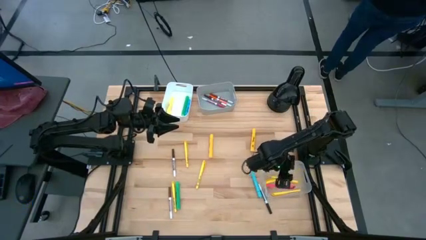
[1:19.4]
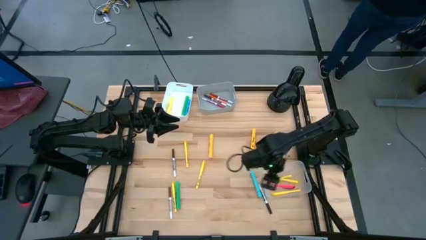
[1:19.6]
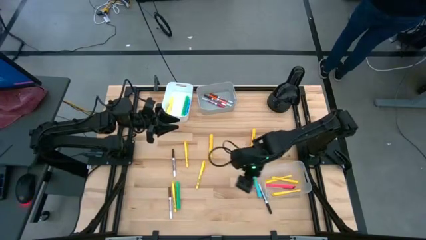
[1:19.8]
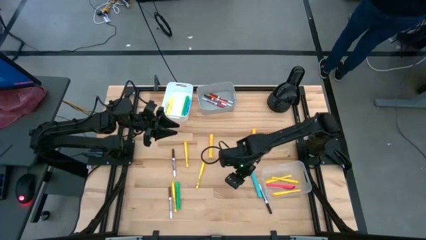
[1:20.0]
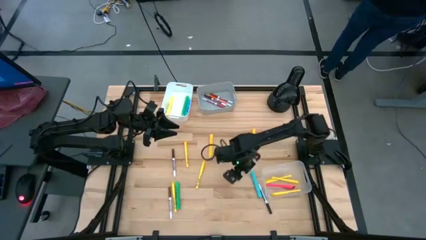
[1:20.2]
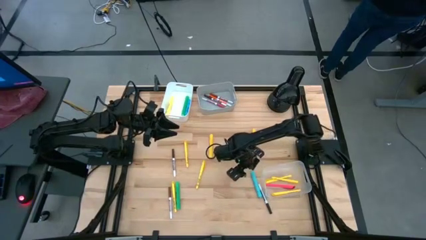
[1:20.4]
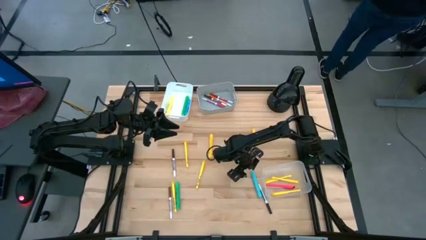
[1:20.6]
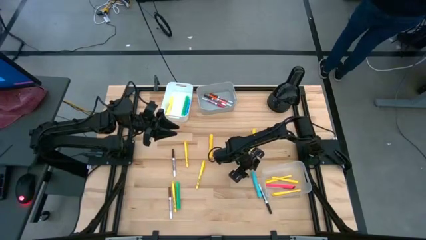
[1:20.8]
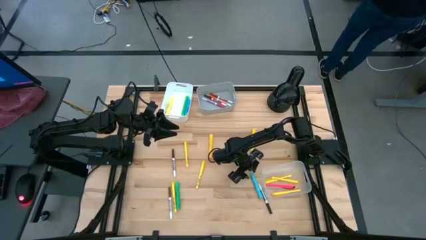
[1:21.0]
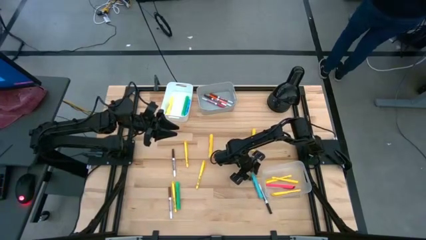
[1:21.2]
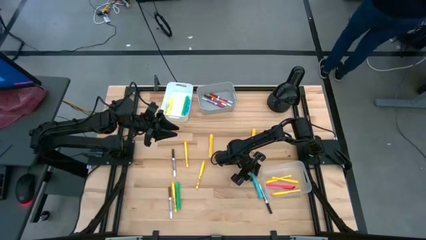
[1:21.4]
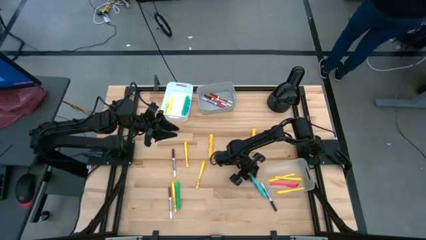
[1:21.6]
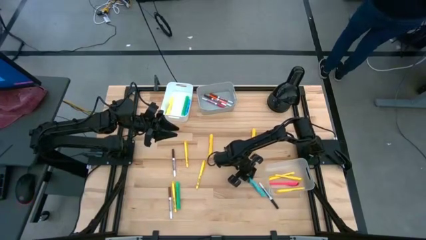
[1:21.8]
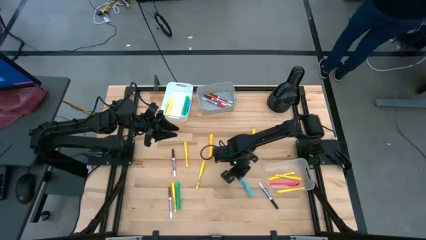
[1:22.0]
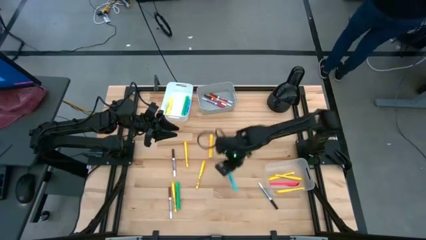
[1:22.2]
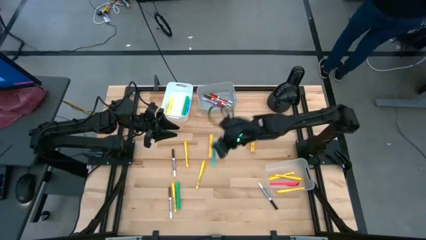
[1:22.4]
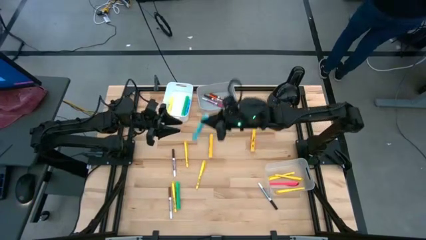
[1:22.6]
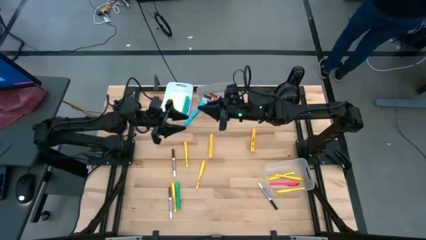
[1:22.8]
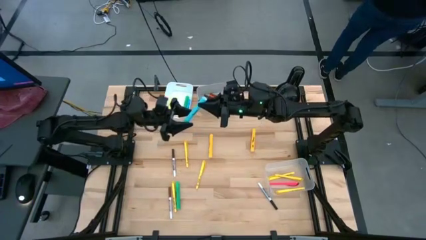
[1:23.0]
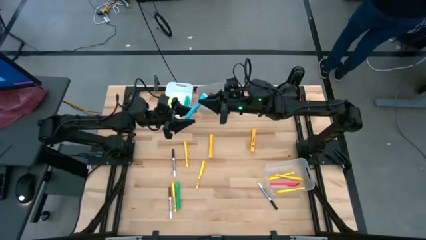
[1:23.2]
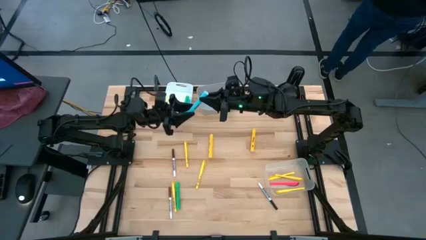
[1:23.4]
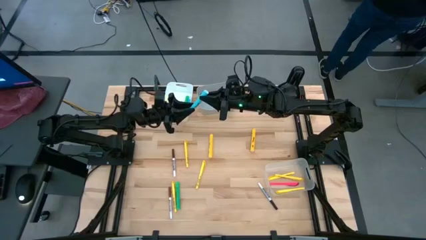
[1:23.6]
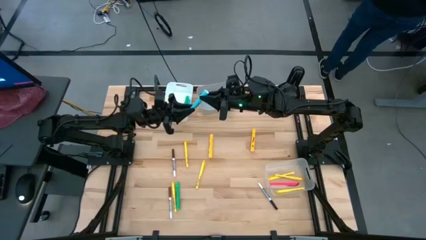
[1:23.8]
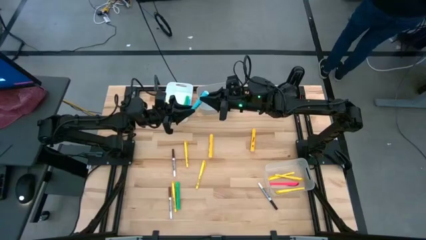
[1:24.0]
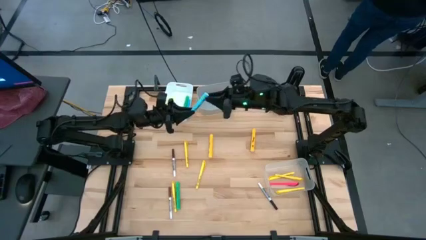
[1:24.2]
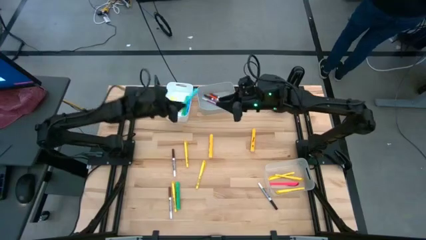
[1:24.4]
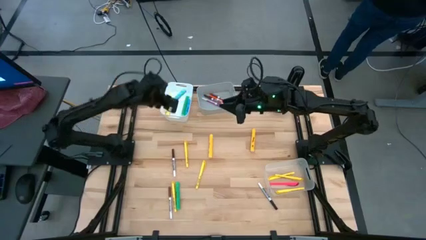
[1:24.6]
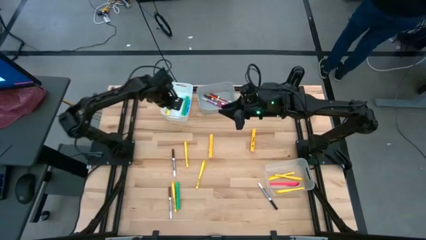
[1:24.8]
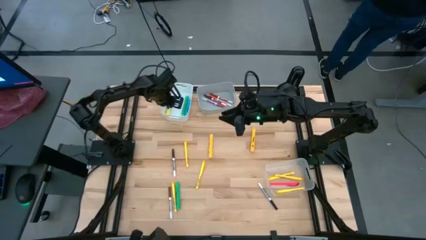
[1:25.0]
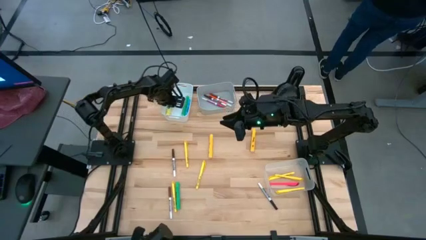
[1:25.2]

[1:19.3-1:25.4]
Task: Pick & Place Markers
Put the light blue highlighter pen into the white bin

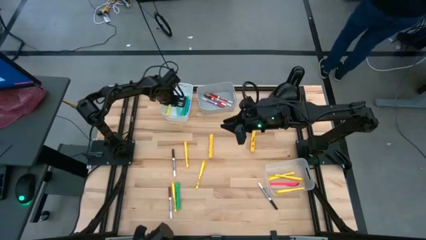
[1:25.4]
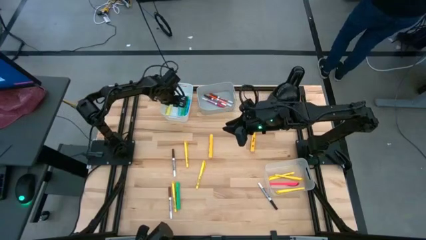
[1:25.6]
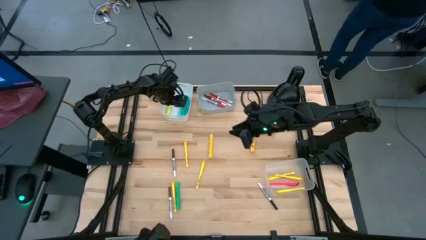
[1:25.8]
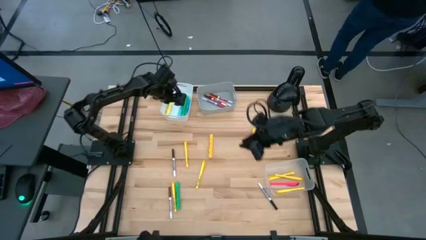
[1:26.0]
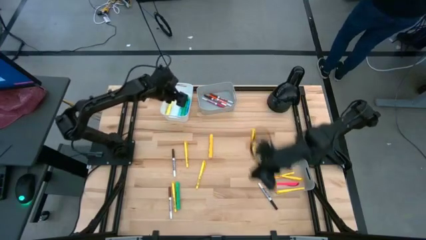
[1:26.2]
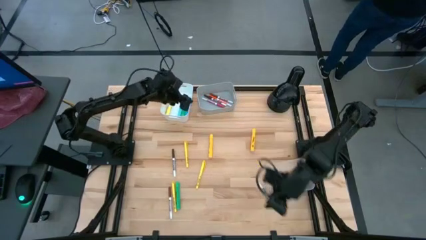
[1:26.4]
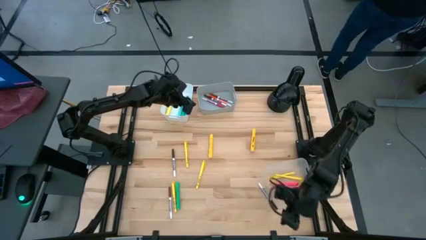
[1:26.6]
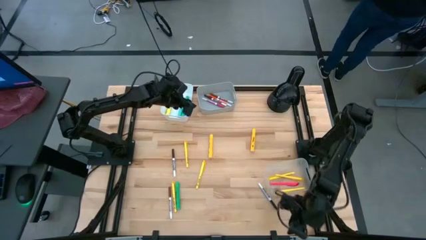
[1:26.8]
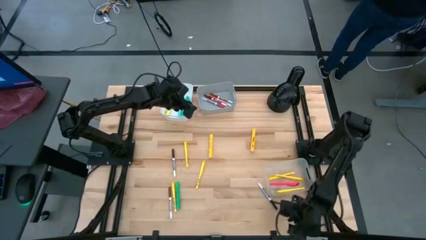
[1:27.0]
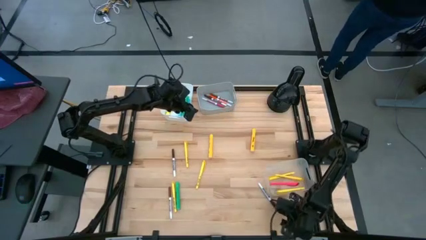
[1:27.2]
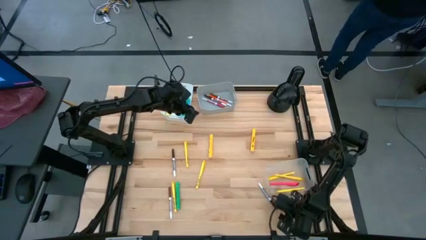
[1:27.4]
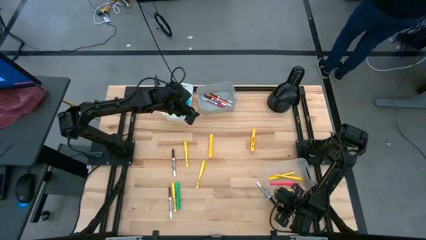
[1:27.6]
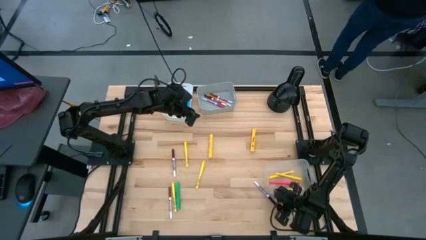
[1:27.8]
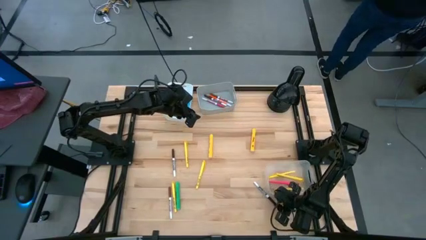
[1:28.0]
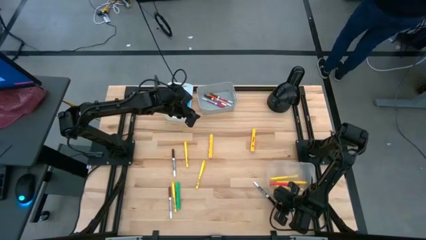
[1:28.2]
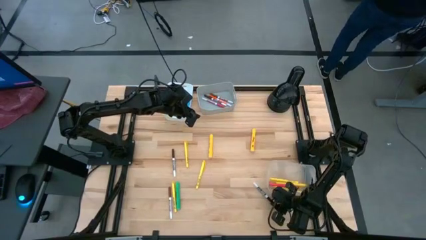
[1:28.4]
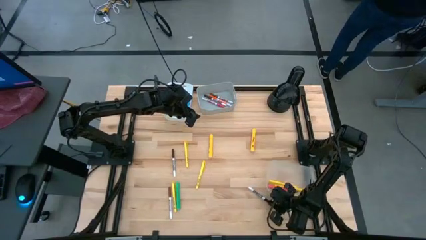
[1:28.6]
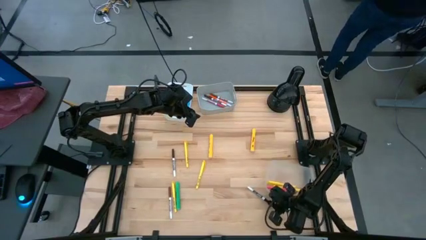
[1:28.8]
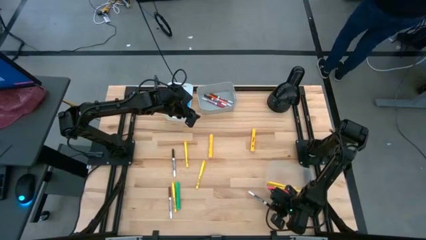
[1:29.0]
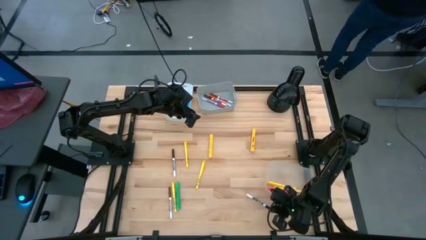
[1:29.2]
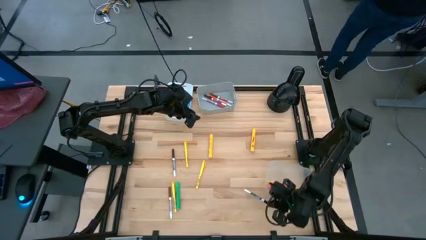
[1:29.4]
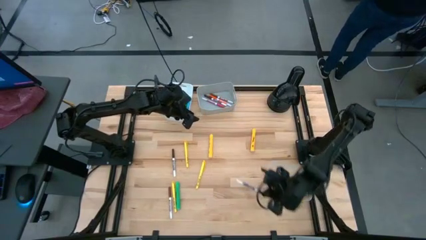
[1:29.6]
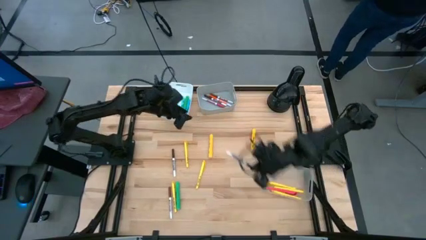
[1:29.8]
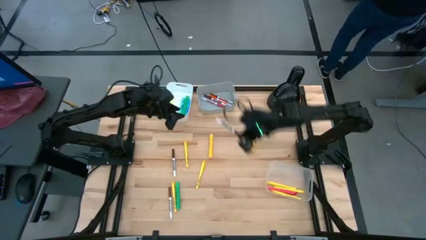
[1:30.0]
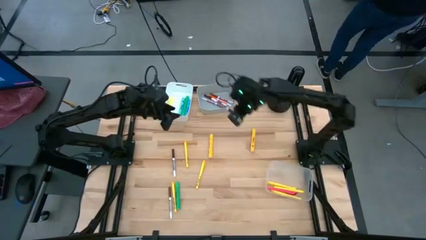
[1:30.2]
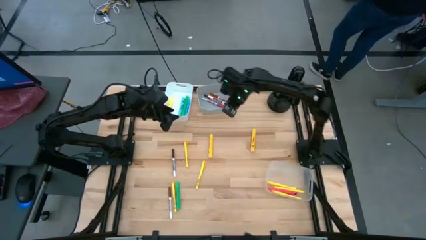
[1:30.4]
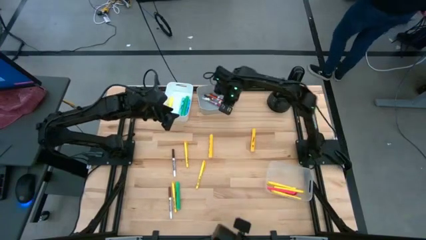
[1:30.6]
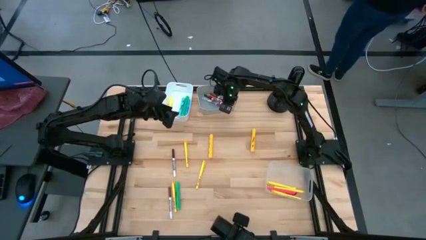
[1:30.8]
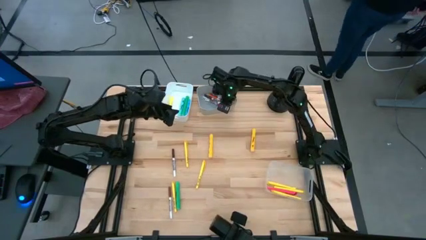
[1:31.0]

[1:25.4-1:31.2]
Put the black marker pen into the gray bin

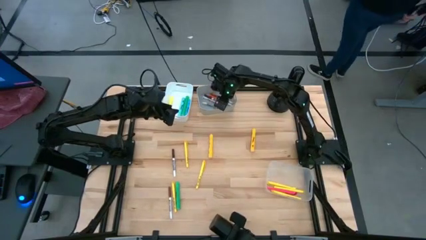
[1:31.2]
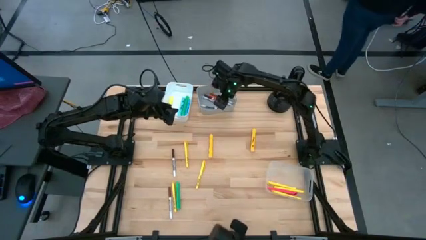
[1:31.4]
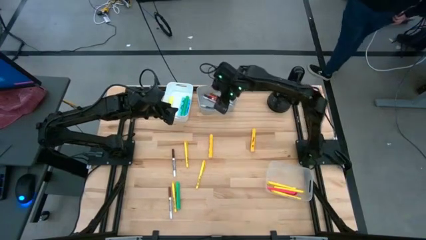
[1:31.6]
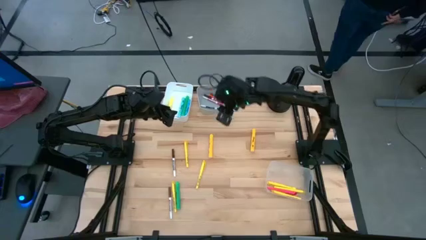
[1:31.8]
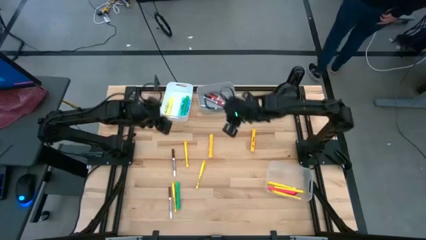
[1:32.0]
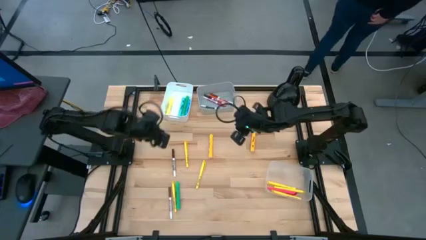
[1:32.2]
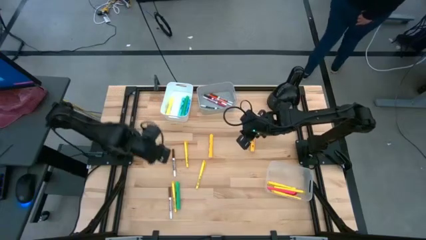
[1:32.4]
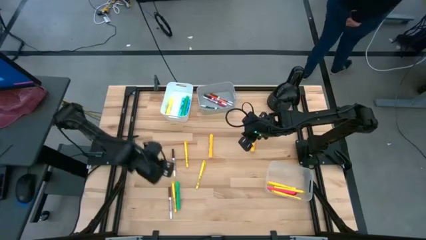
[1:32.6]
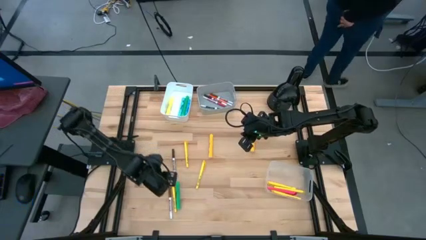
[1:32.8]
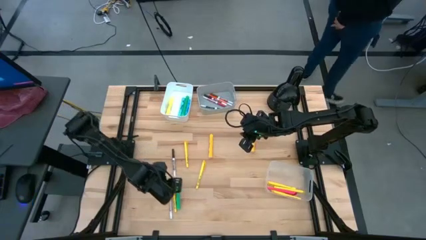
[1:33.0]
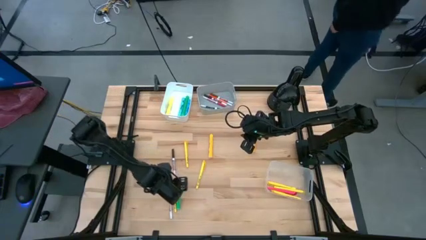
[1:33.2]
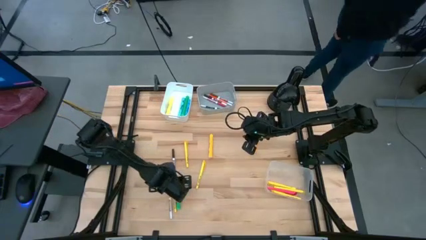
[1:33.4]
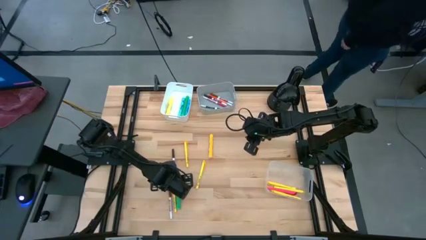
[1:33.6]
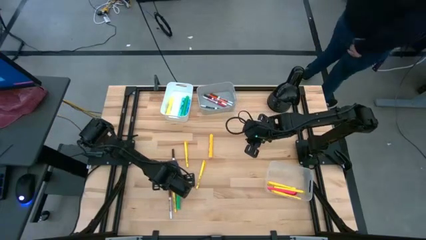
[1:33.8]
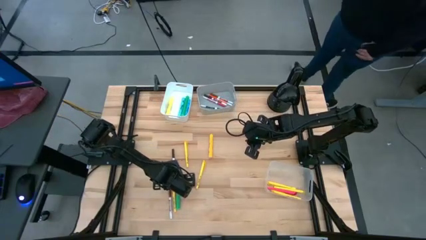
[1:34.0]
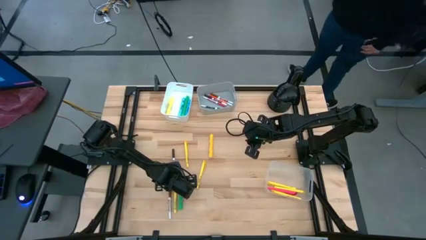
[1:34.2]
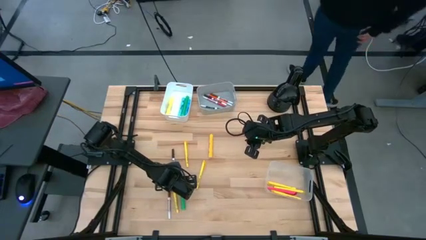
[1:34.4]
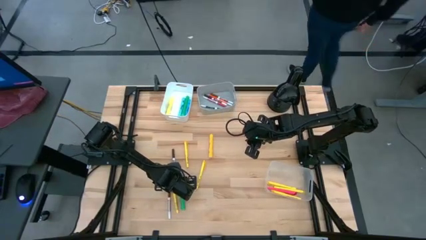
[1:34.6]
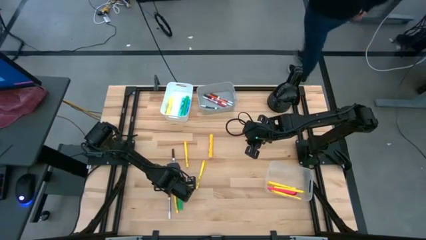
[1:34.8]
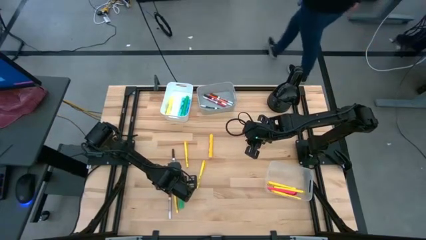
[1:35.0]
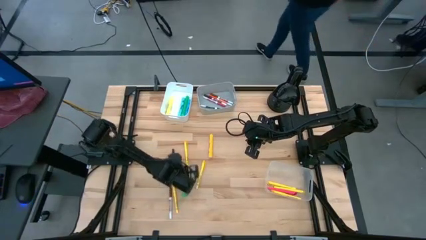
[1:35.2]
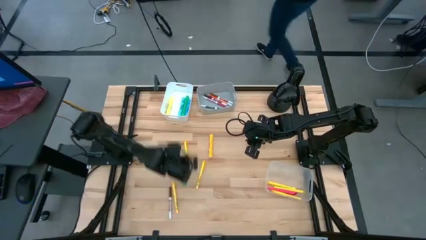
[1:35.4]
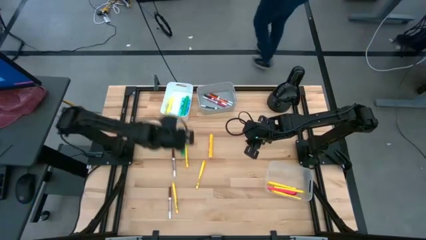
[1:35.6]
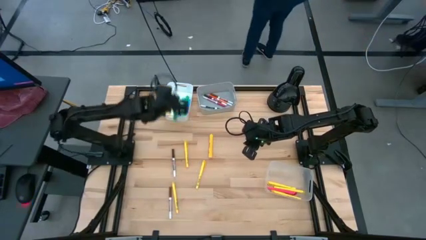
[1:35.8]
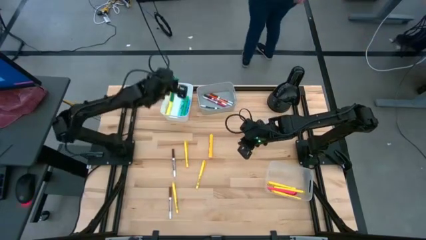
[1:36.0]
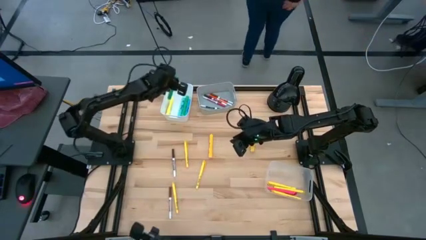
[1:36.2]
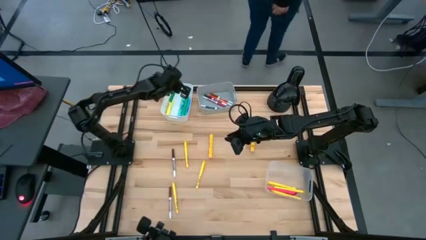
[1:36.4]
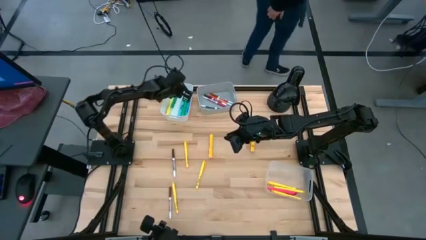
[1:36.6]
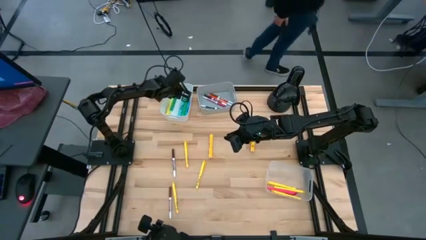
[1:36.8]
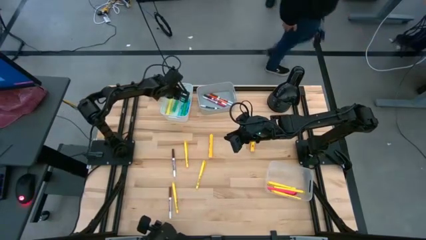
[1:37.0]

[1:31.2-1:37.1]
Put the green highlighter pen into the white bin
